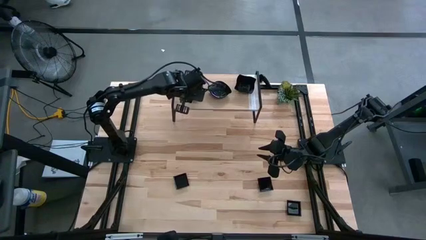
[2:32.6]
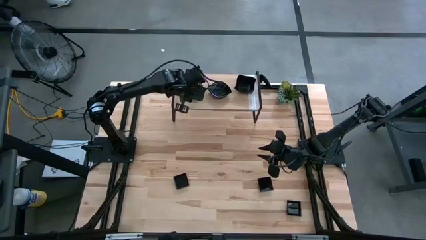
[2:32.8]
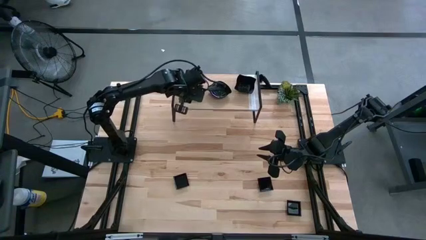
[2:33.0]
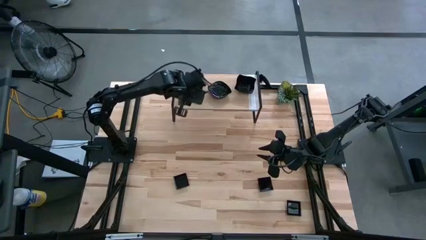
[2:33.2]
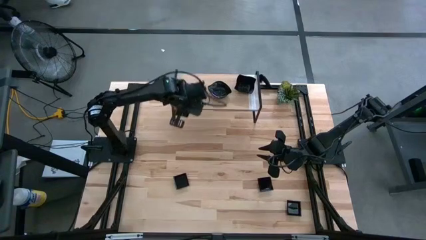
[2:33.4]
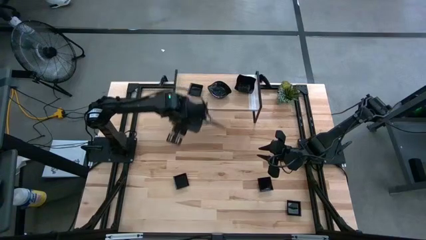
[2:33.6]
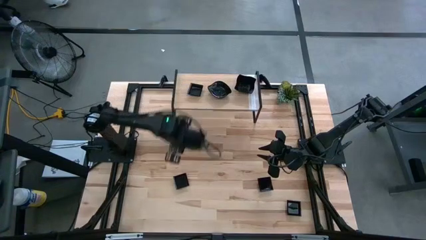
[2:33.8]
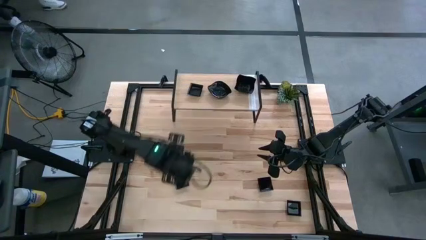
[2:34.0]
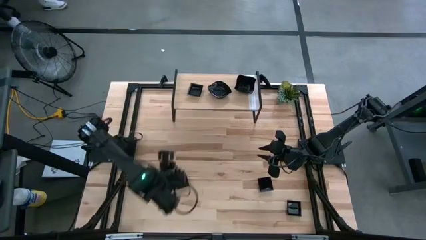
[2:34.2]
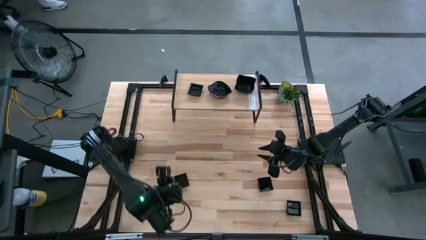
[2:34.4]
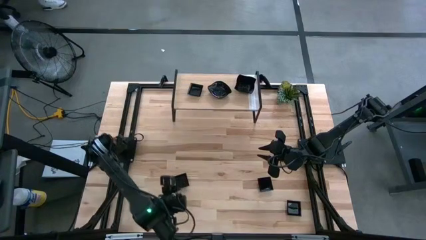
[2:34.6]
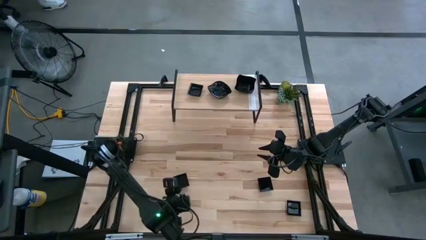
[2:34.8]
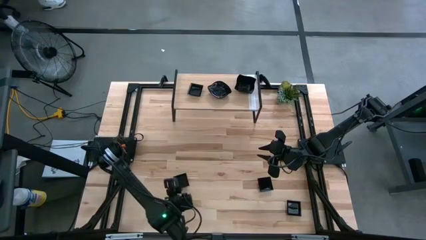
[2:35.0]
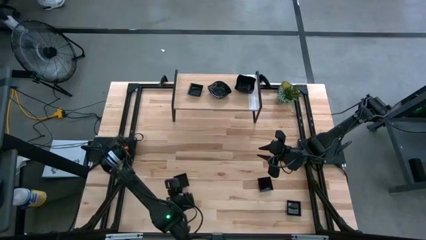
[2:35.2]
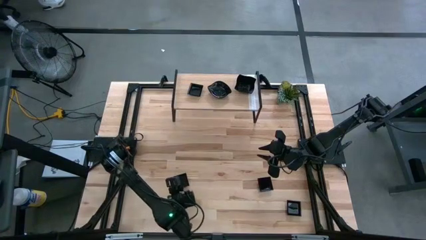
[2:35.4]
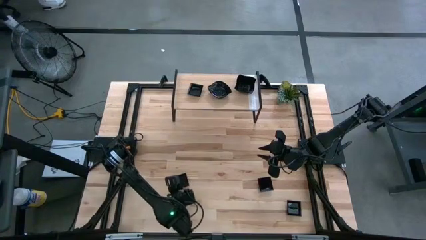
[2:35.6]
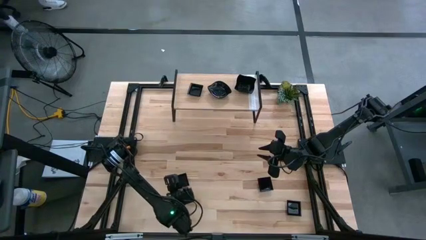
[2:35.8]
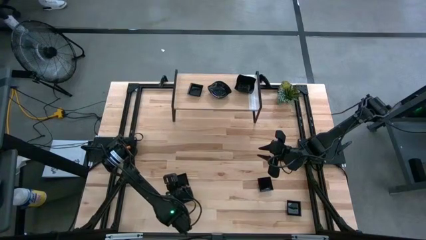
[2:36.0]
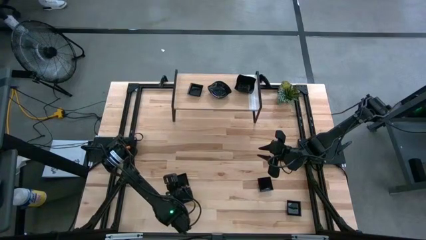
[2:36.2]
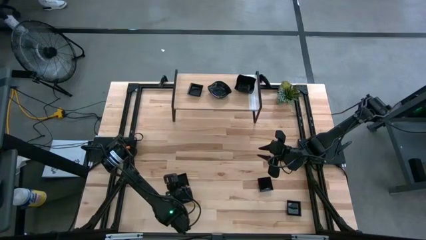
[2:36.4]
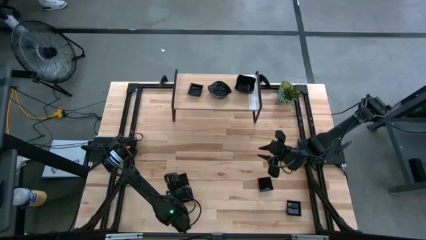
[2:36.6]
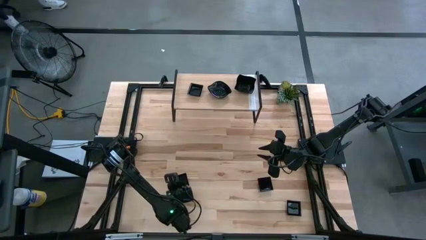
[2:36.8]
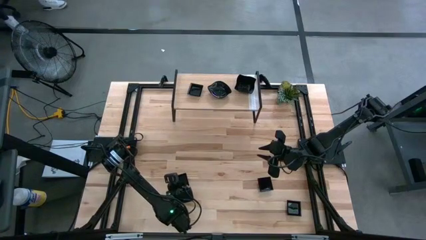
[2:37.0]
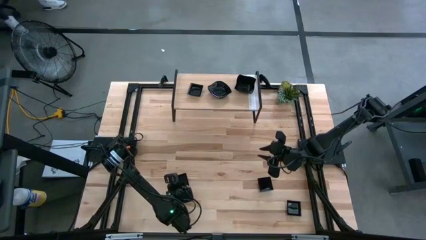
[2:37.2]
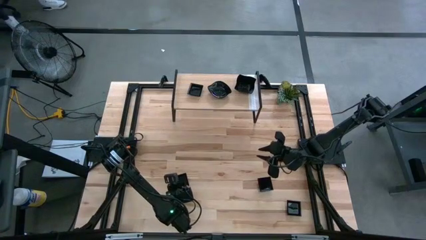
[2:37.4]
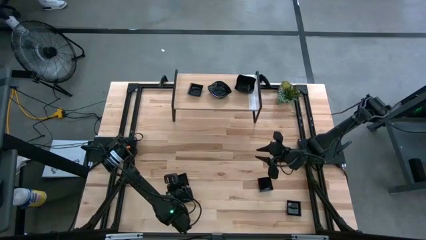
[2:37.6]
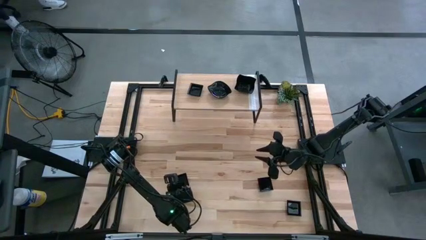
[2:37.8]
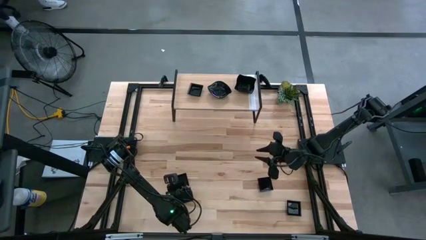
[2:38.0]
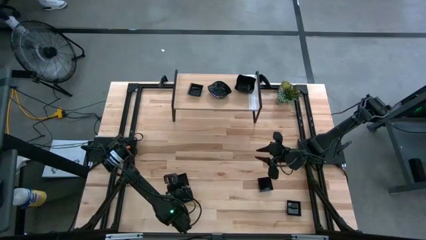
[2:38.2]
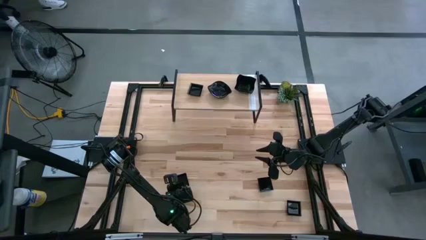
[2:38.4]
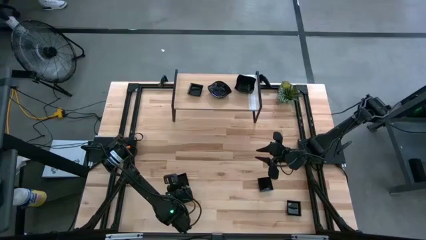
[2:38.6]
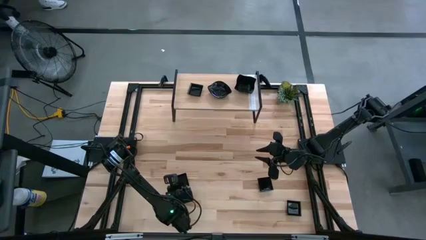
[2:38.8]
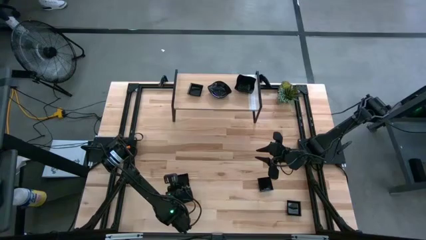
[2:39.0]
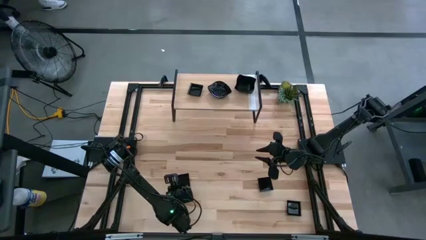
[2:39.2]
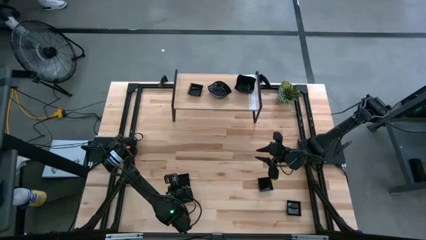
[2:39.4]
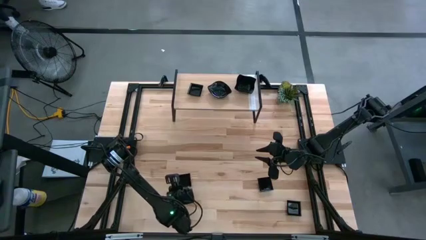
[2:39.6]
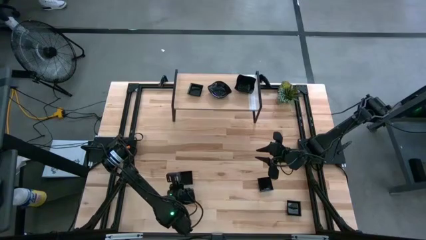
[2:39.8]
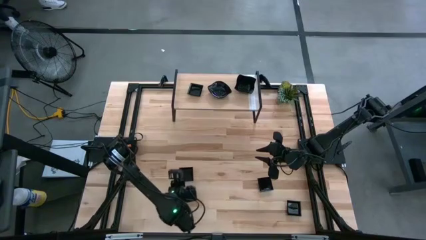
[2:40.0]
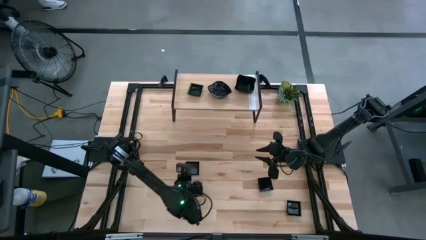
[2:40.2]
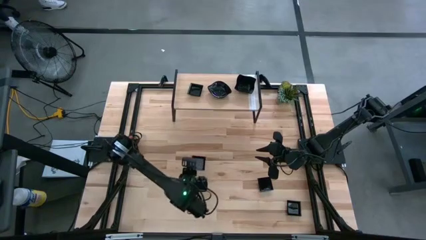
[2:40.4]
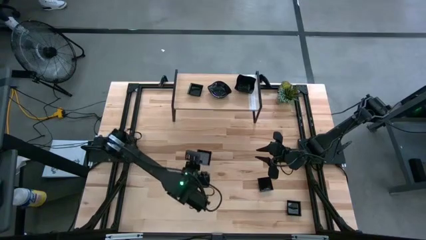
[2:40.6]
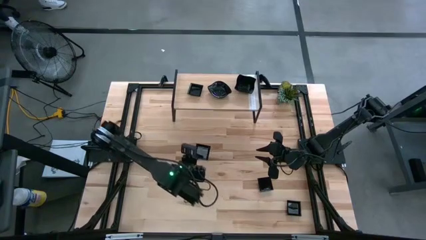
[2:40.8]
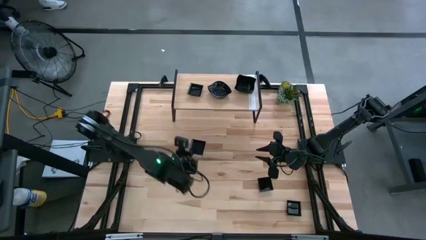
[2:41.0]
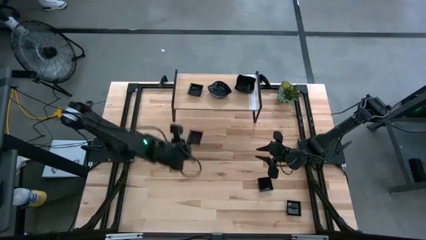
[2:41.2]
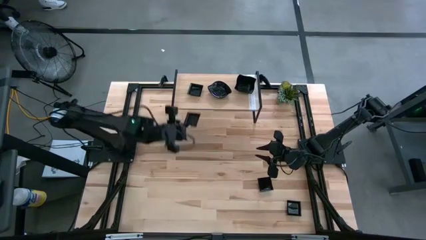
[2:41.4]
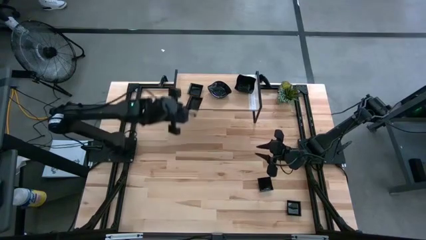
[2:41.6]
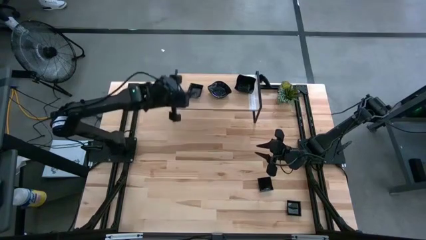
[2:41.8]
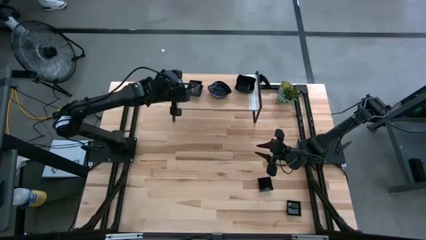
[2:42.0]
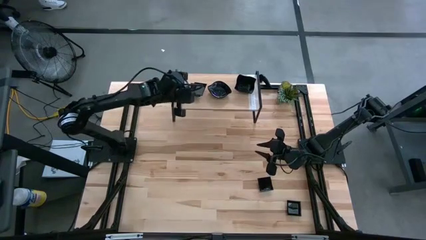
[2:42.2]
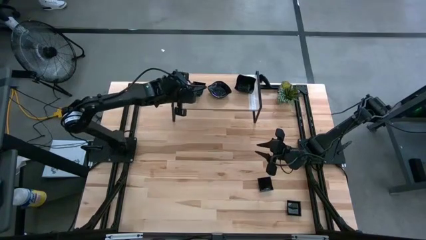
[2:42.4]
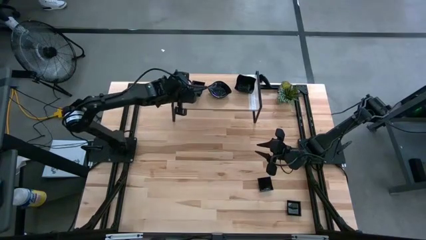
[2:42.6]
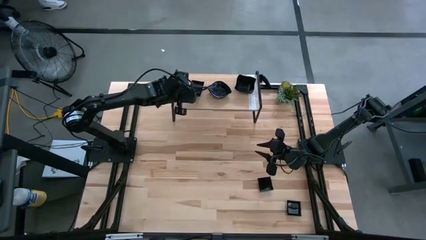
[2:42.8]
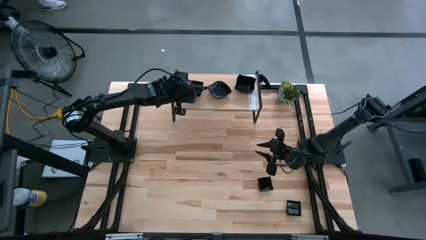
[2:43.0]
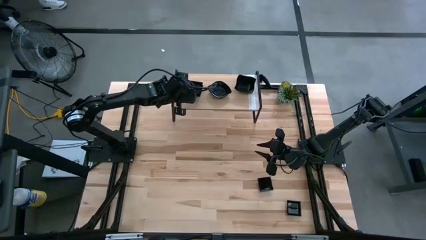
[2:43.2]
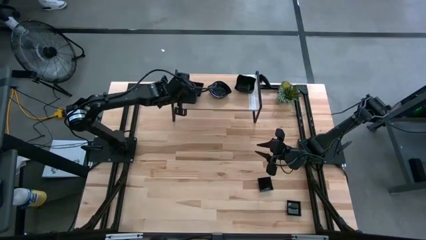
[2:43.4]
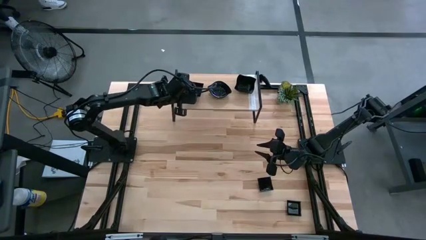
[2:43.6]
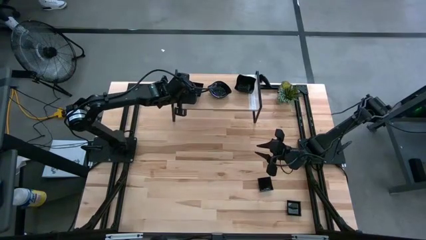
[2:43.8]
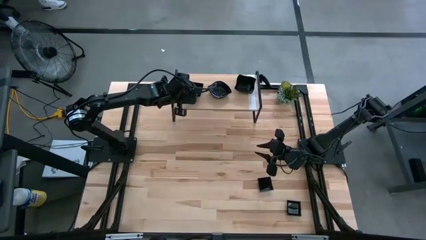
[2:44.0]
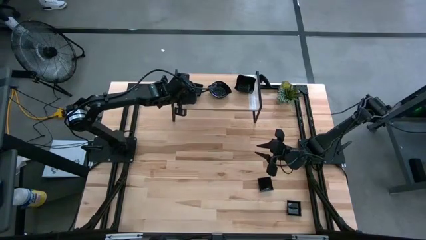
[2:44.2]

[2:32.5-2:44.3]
Task: Pick & Place Mini shaped plates
Stack the square plate on top of the other square plates on the shelf

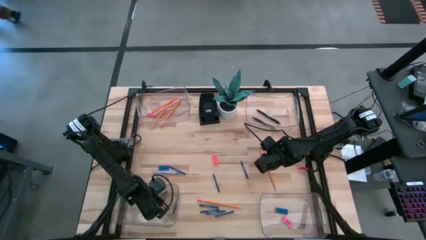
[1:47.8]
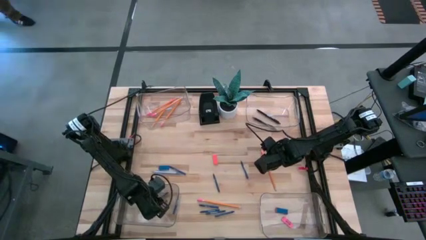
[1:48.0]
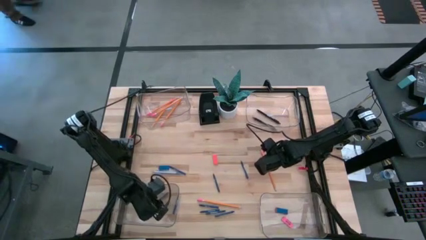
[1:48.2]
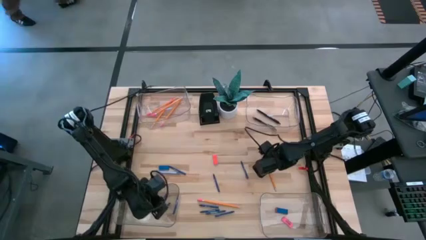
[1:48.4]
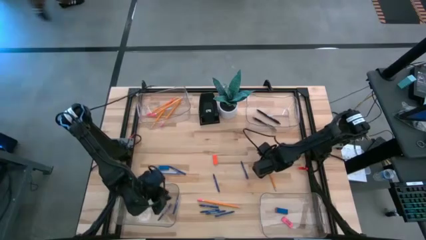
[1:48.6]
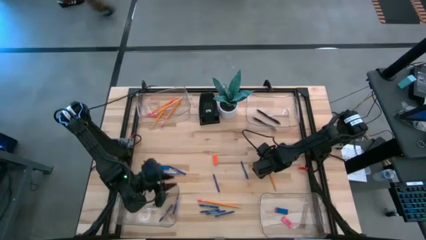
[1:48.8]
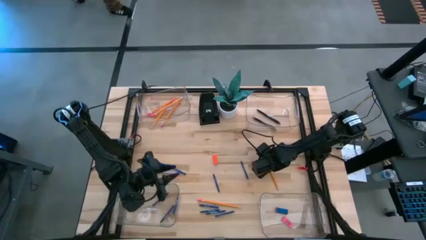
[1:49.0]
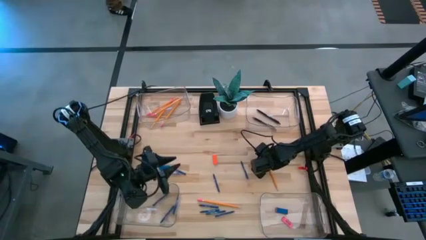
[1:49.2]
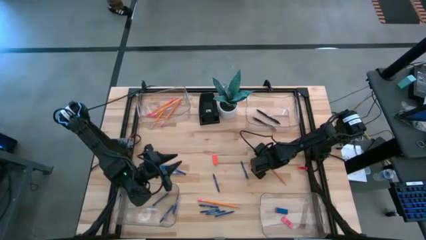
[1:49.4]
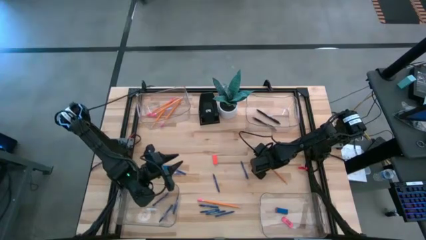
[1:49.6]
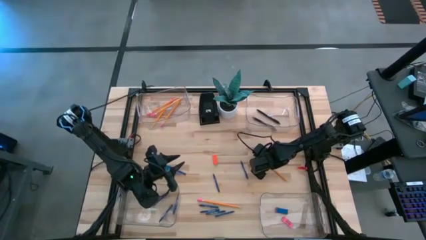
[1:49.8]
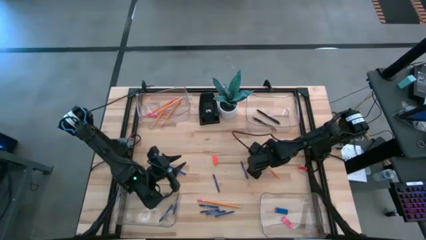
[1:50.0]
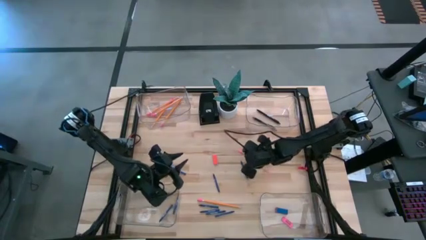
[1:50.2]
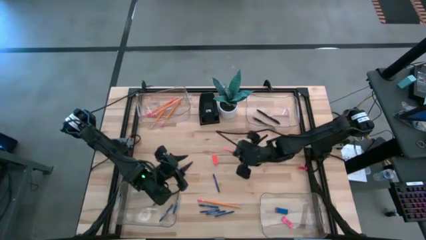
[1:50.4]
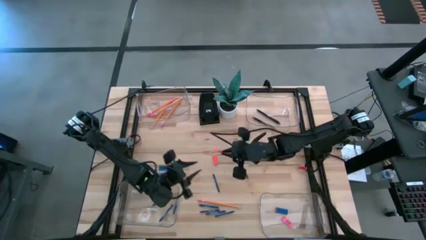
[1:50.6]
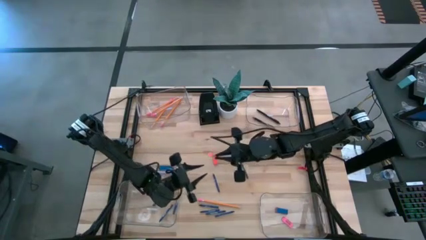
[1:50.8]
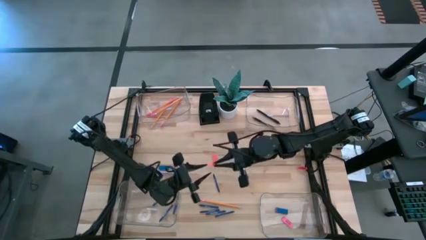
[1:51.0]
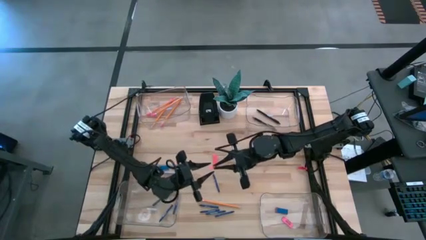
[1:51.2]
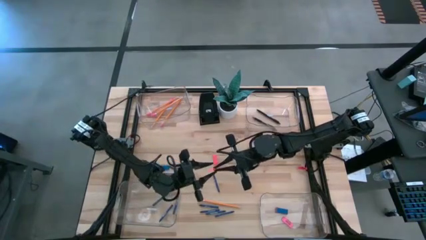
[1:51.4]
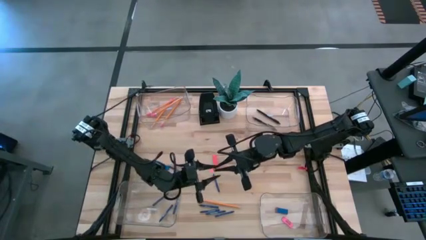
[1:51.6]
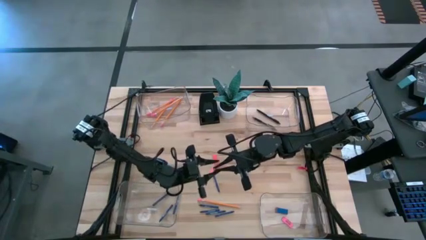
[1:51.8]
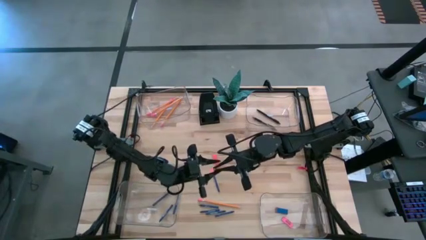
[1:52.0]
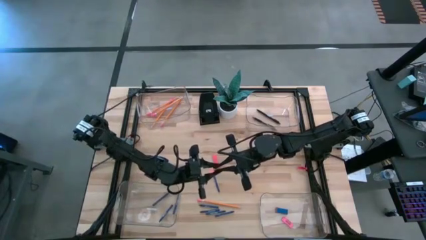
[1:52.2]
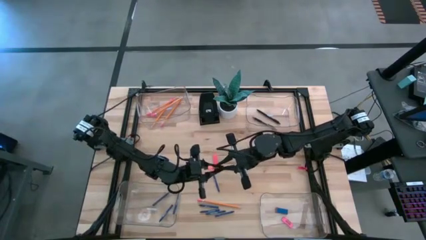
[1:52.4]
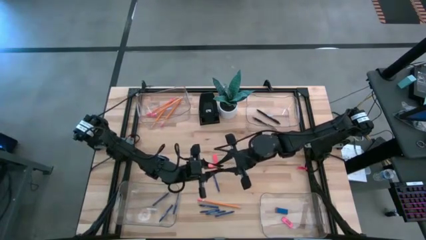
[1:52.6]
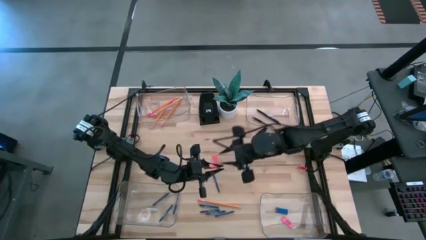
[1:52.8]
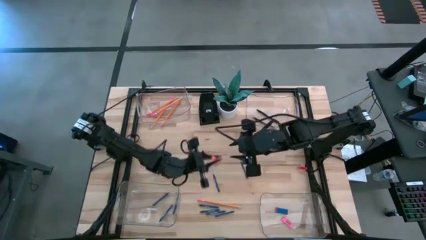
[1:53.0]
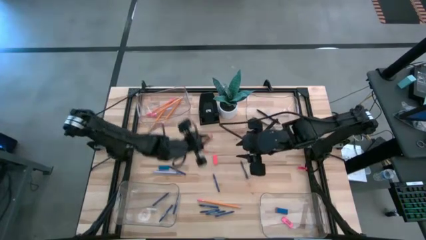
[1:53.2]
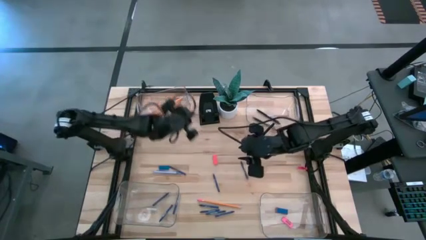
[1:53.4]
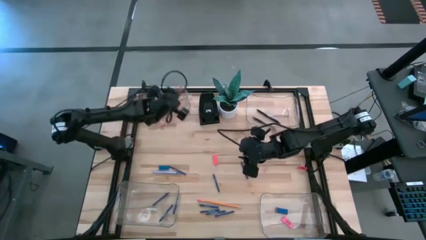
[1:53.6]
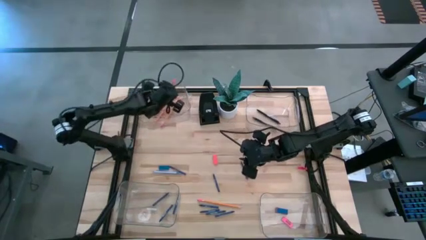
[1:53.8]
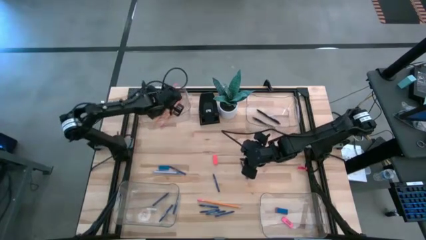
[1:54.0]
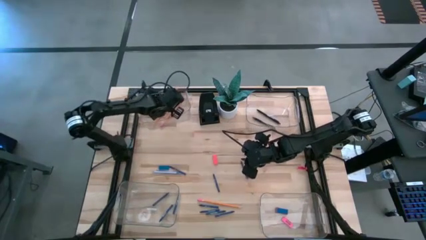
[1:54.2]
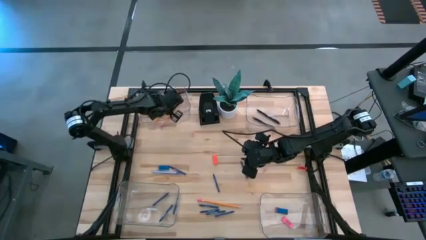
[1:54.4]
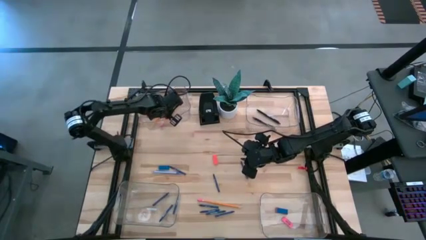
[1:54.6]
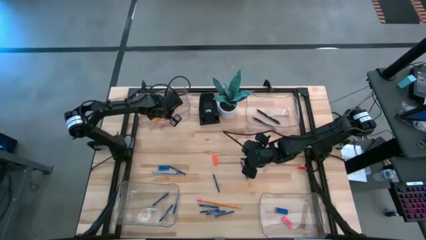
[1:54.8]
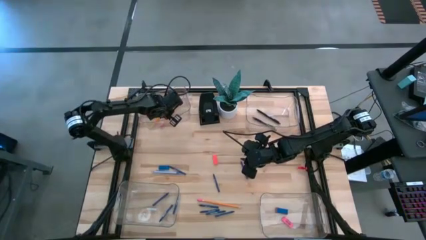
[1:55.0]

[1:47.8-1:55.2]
Task: Sort crayons/erasers/pens/pencils in bins
Put the orange pencil into the top left transparent bin
